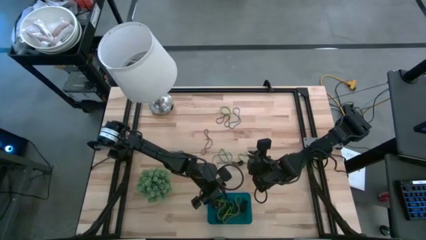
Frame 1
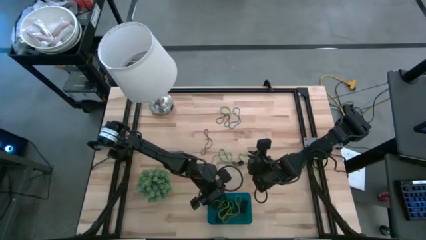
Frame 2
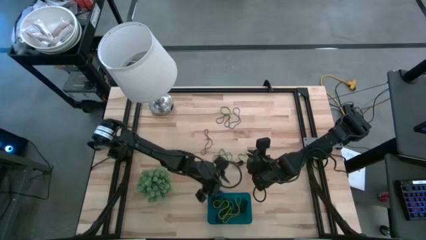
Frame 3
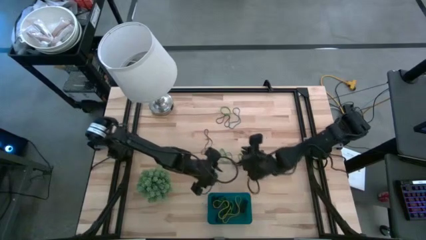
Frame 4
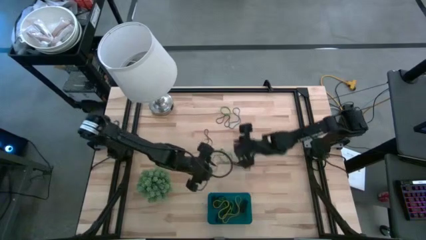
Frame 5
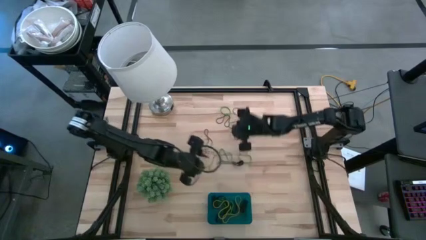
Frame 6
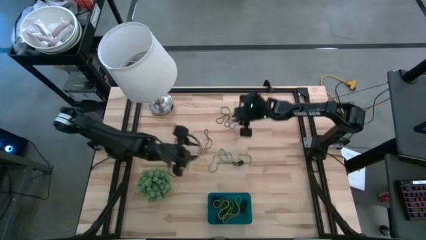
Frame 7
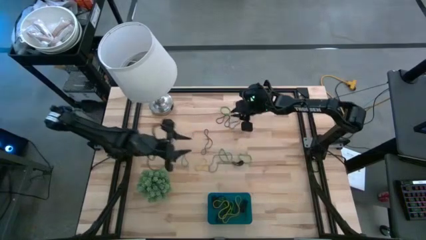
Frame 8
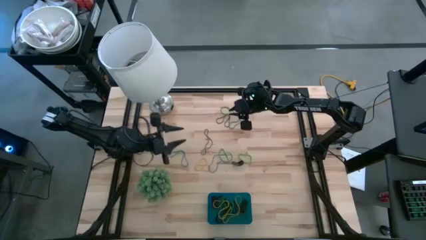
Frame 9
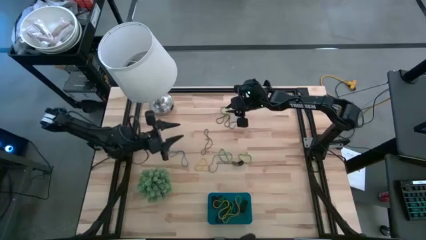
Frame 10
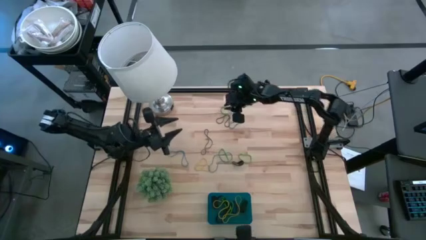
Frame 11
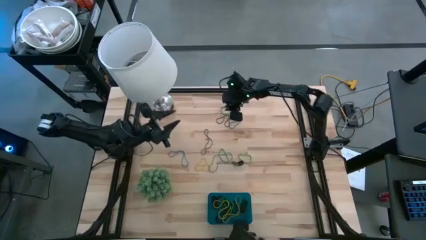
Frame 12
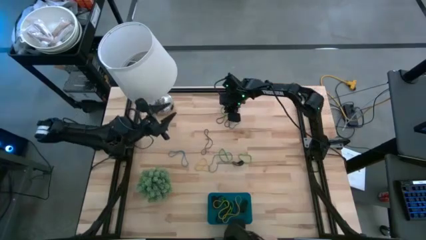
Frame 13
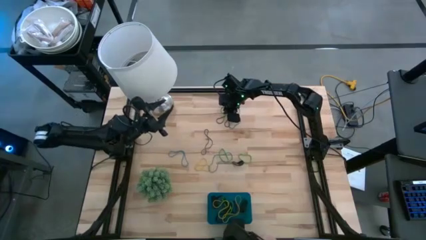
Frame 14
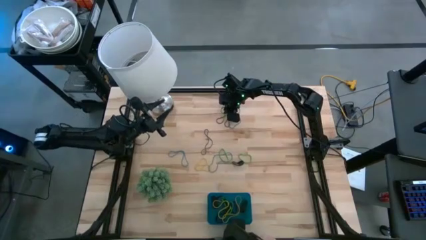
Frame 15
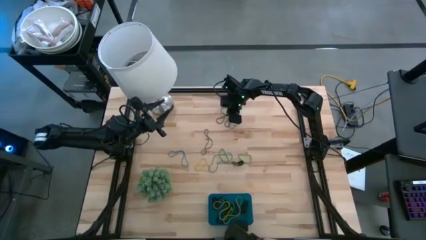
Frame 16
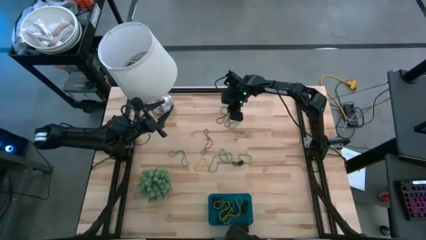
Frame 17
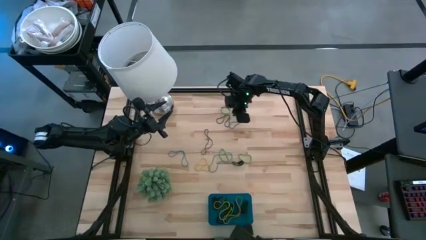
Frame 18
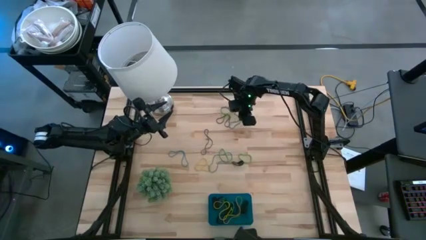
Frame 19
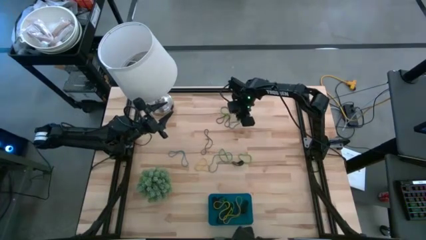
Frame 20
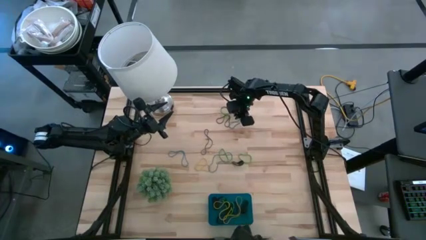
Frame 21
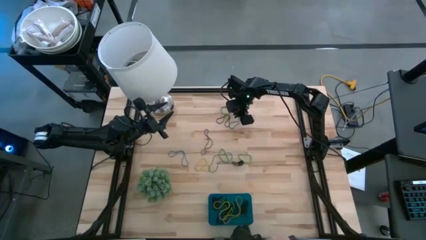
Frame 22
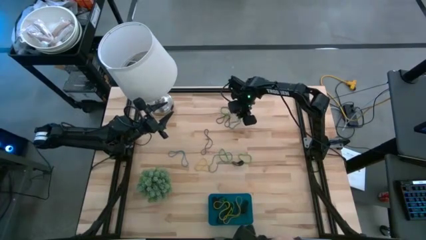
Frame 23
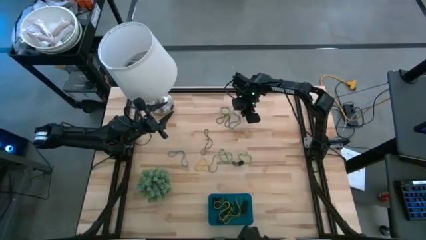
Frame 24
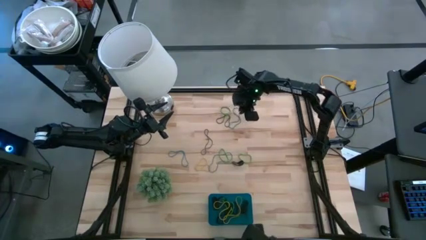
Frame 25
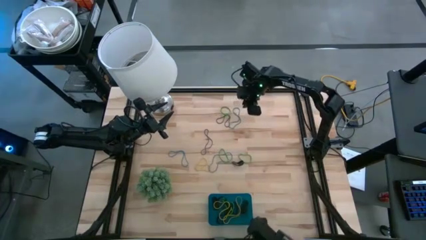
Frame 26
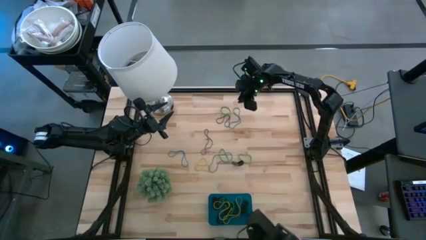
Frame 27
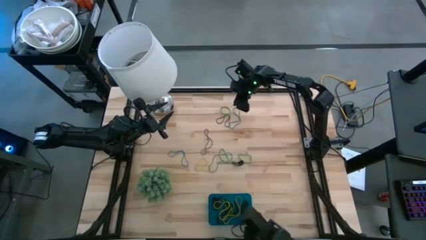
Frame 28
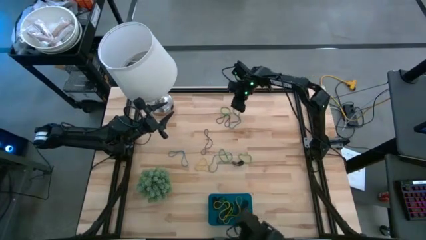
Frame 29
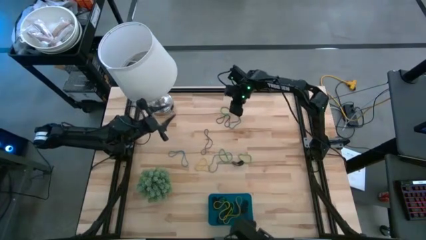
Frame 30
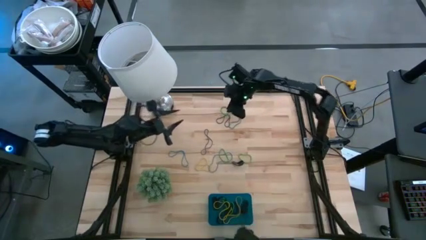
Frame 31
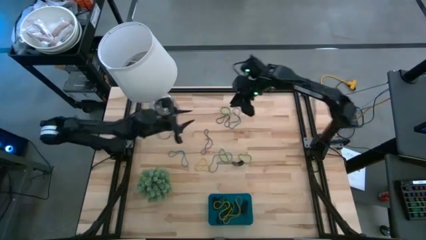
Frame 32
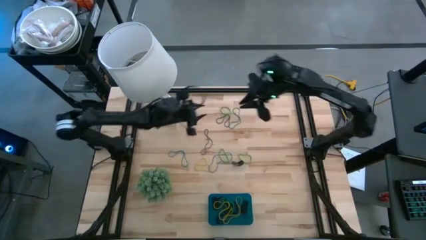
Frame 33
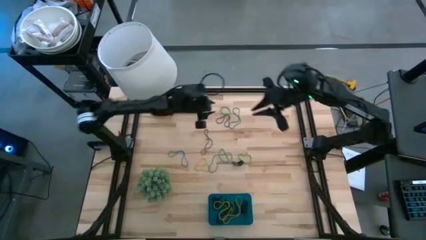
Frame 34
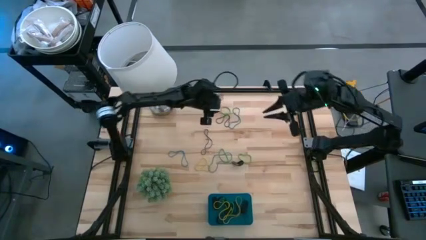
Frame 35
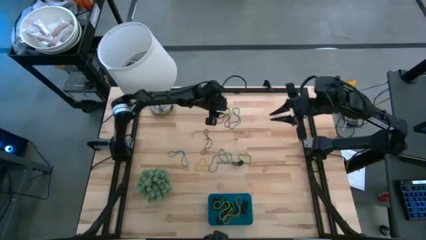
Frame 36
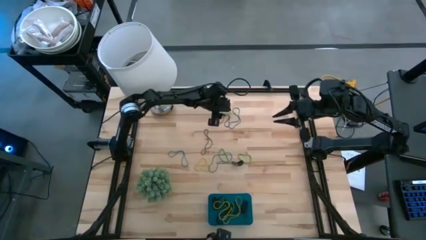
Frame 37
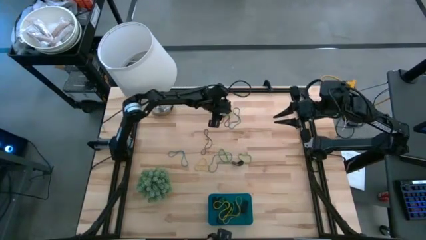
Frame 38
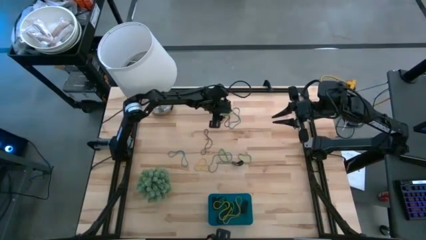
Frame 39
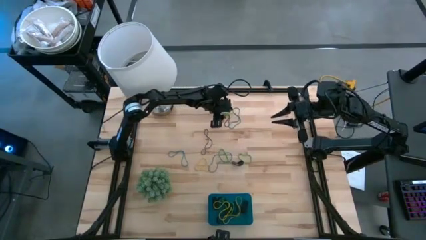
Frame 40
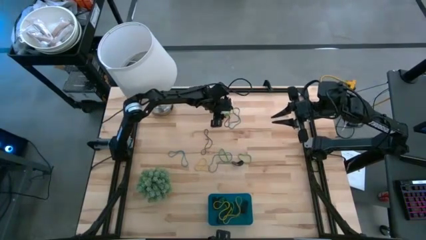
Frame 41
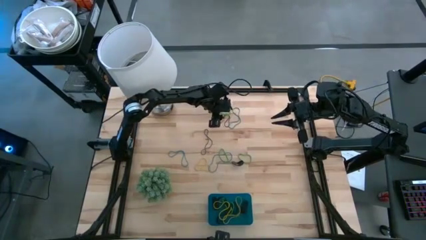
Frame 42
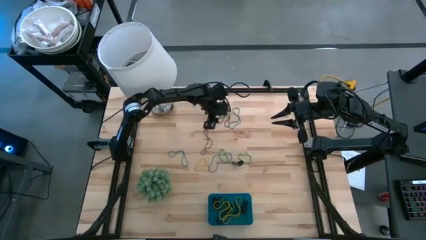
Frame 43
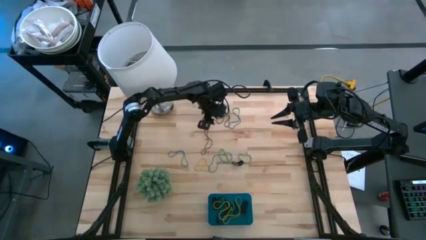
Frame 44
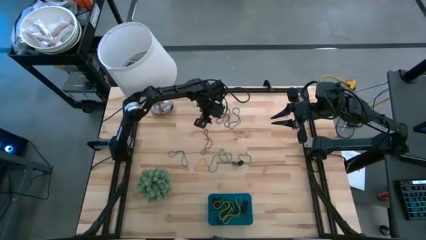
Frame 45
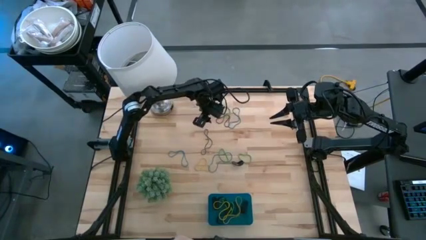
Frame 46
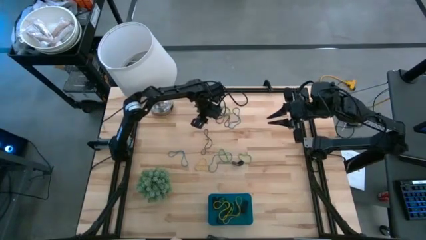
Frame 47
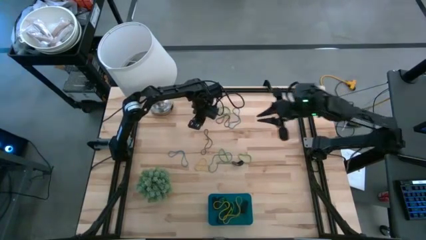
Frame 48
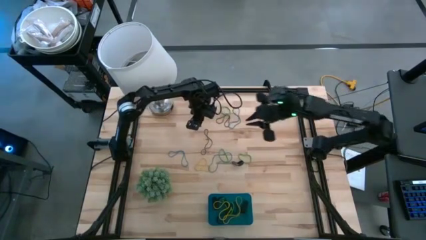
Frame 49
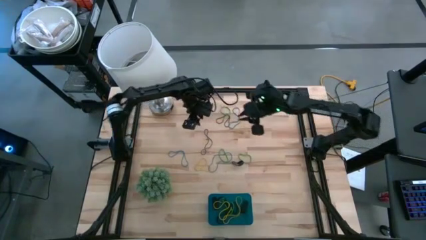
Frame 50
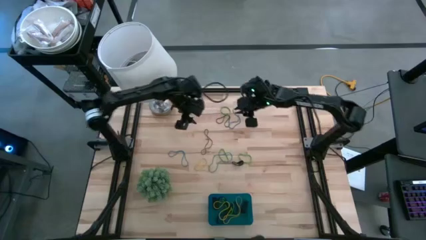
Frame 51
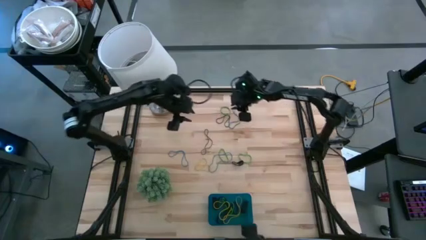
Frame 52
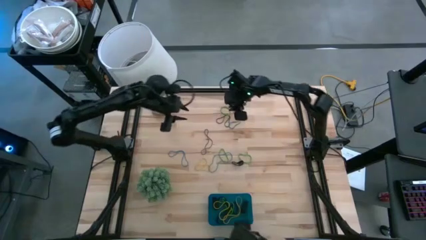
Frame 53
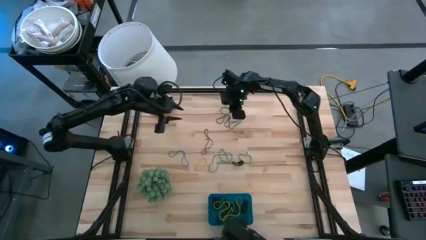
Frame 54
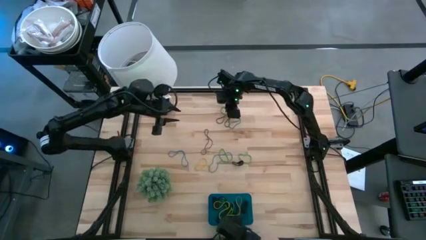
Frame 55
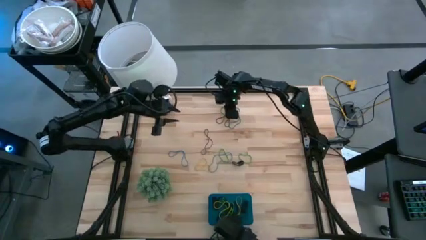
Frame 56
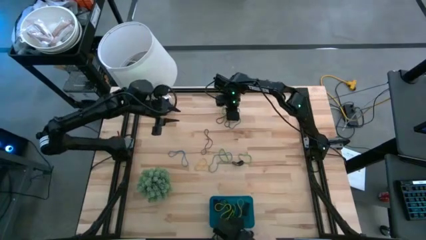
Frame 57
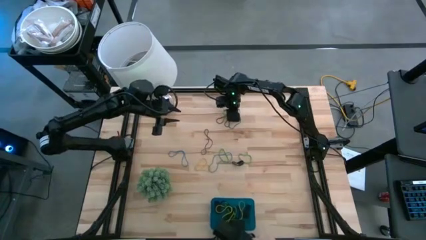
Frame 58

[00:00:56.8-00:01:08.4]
Task: Pick and place rubber bands into bin
Put the green rubber band into the blue bin
